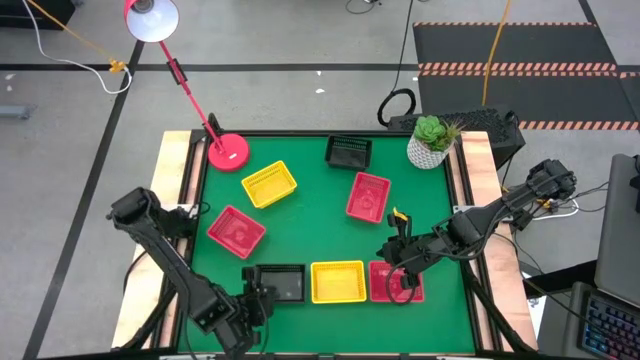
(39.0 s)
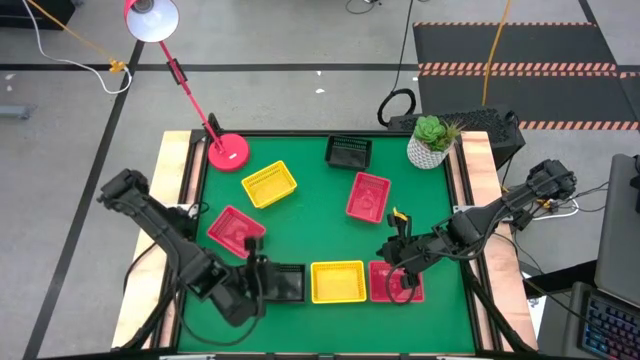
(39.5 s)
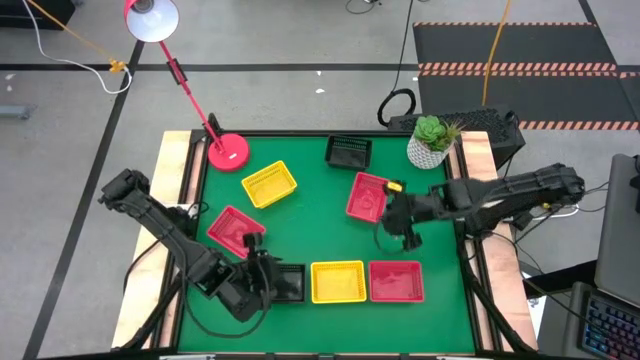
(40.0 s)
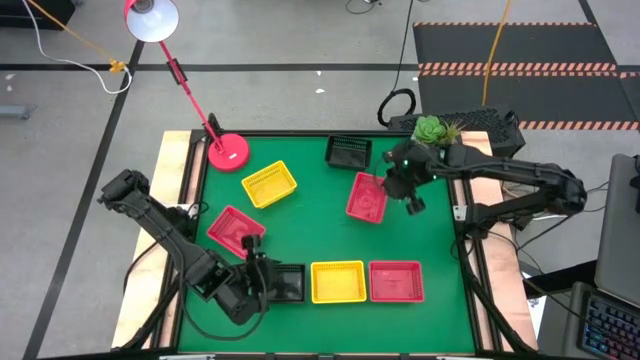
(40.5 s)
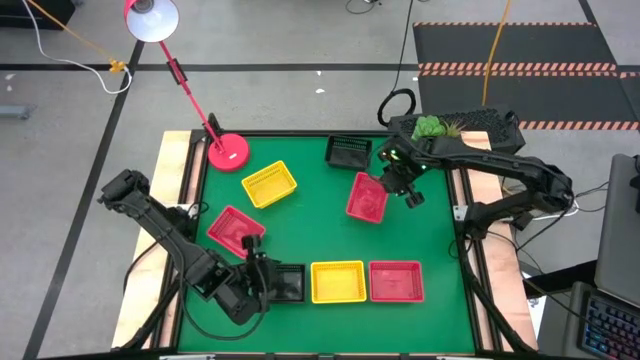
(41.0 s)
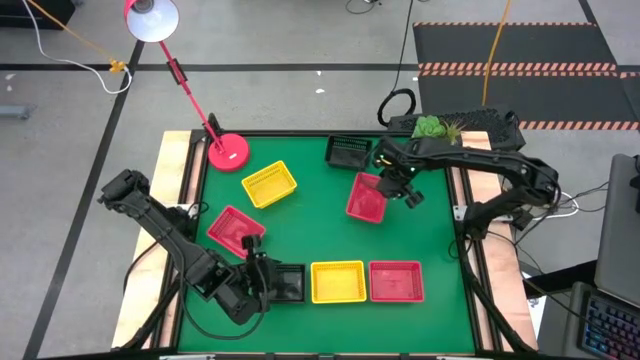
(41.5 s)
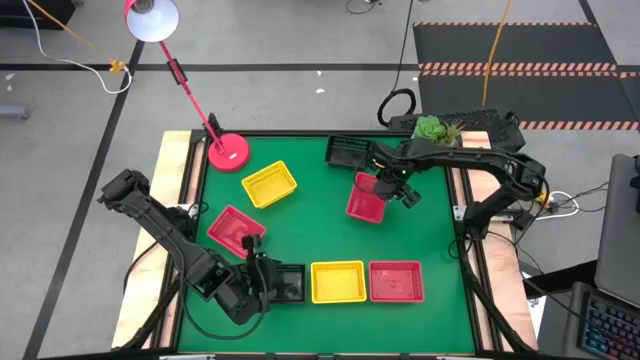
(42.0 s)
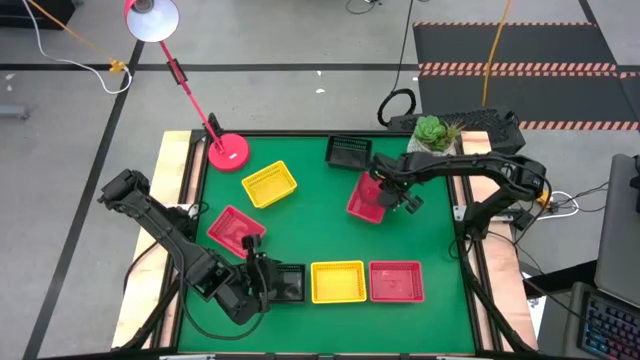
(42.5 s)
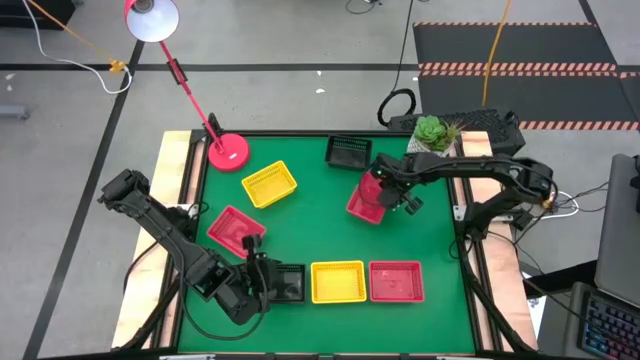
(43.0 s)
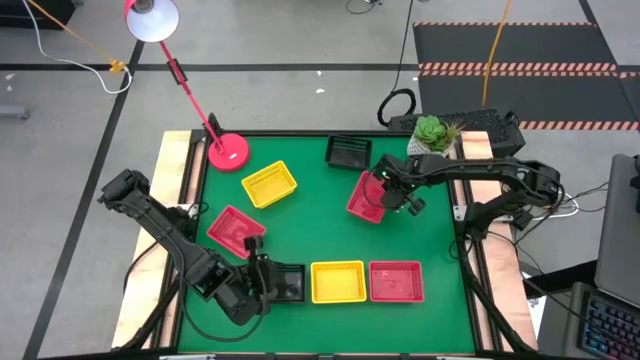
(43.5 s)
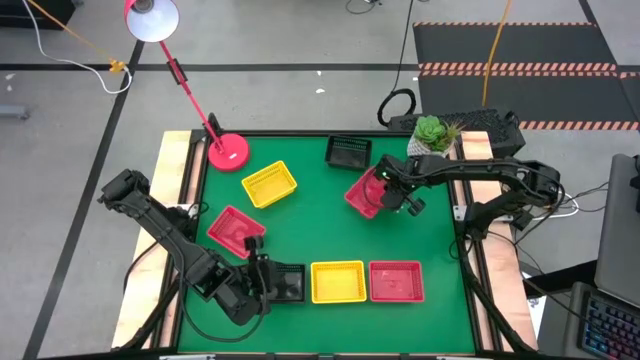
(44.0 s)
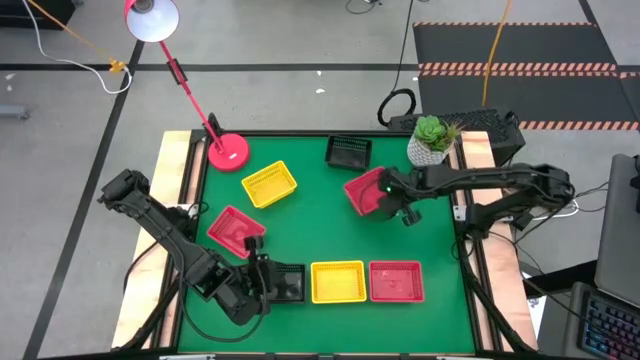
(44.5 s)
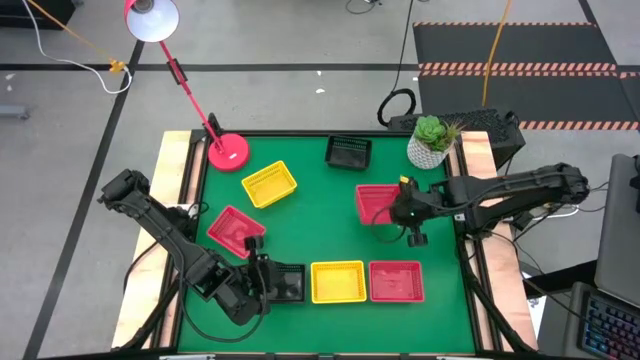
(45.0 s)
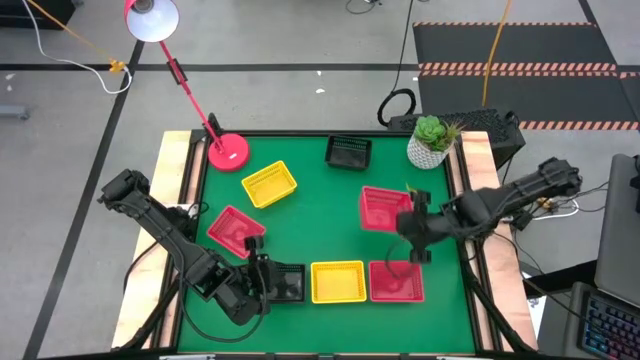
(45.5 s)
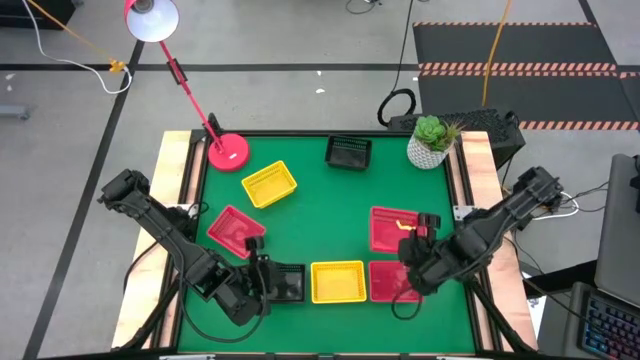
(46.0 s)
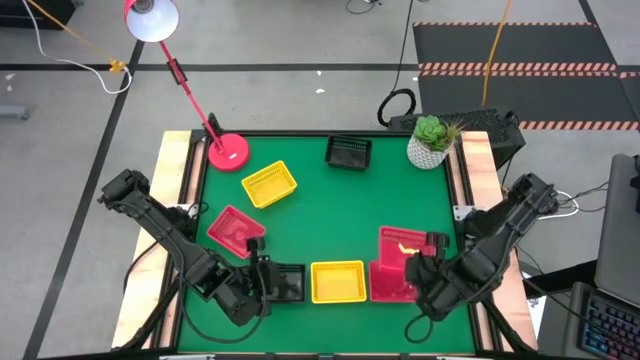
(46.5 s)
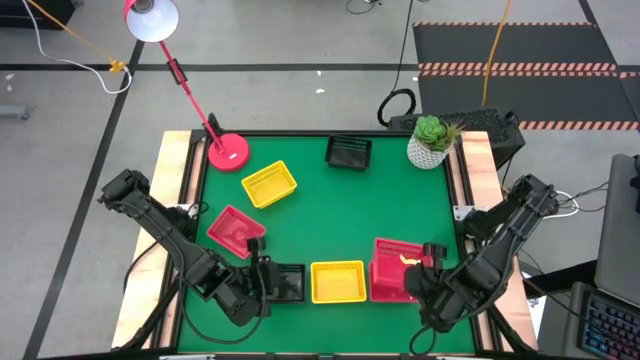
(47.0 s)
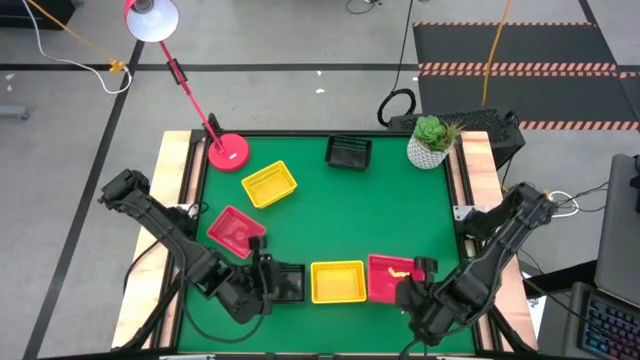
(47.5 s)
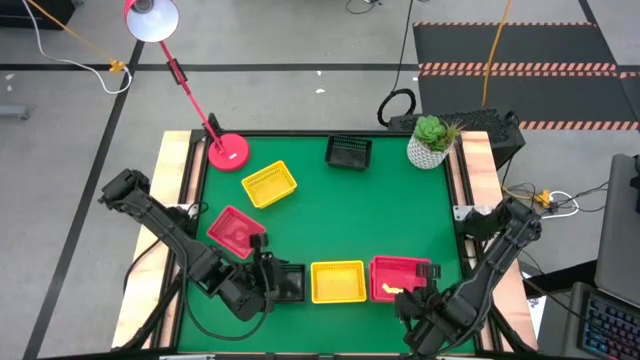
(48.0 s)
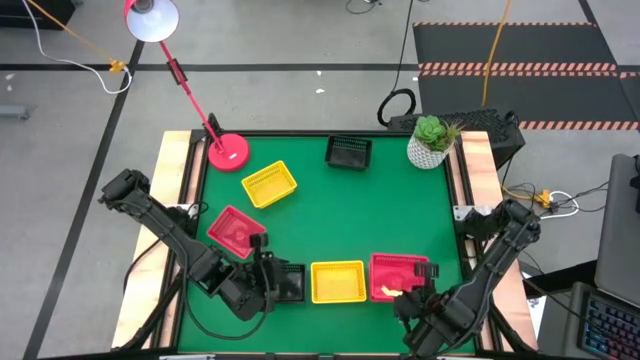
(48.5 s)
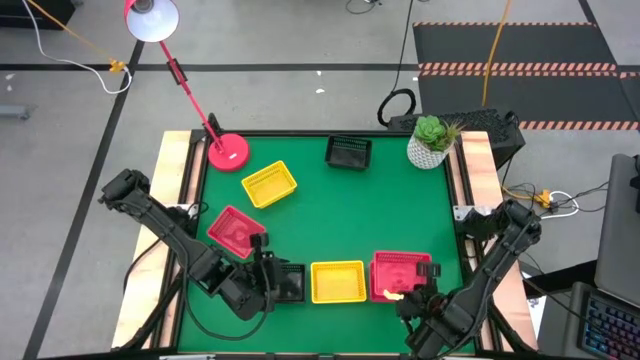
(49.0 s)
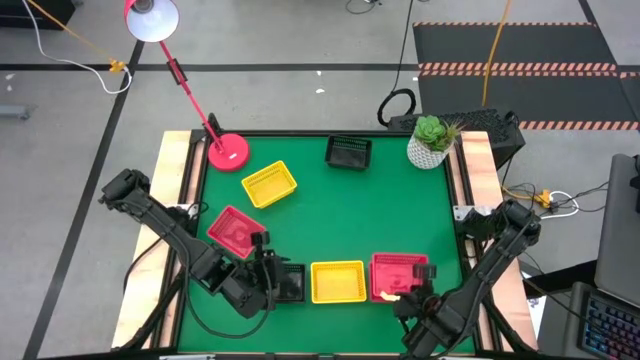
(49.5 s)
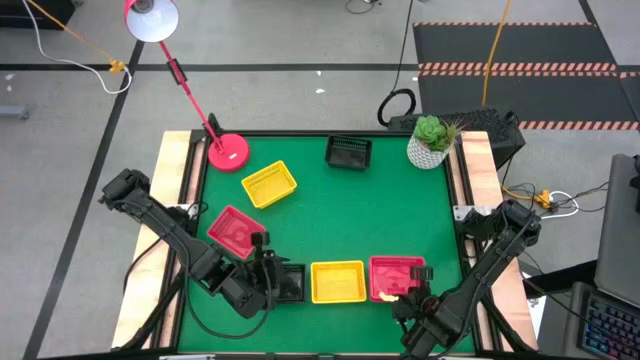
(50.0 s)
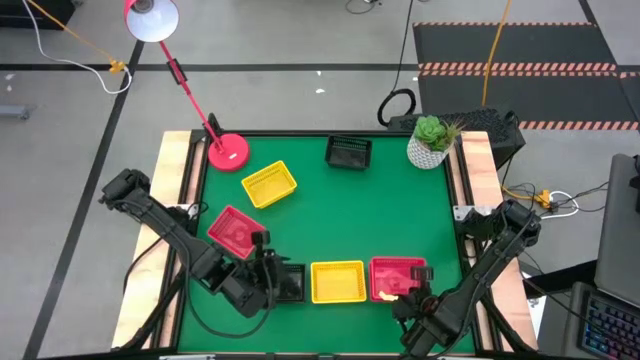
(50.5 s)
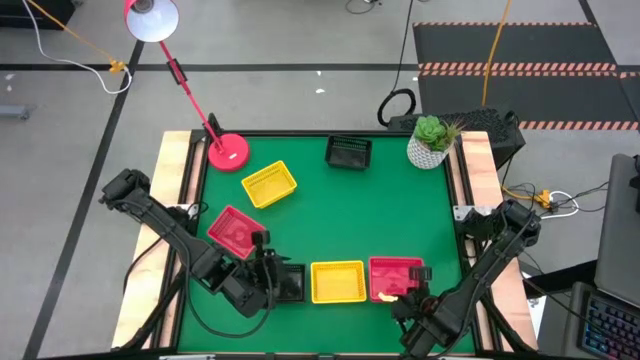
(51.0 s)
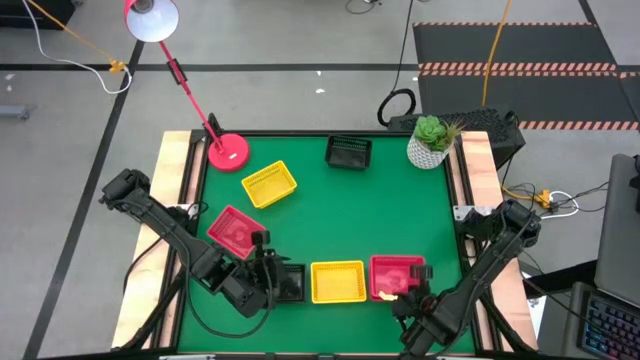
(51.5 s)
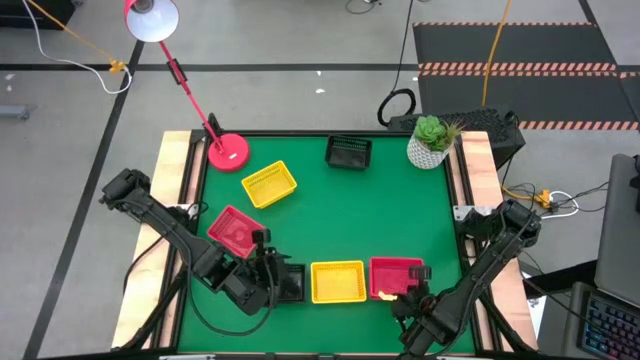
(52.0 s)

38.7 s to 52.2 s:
Stack the top right red bin on top of the bottom right red bin

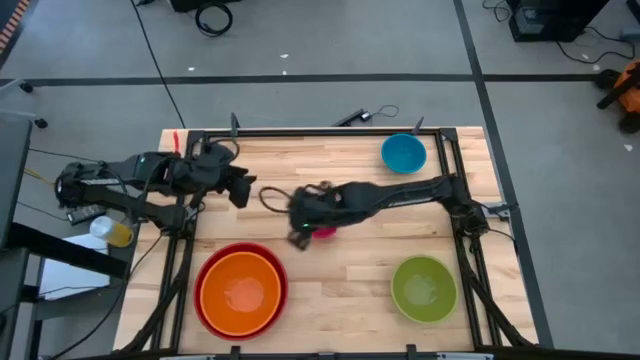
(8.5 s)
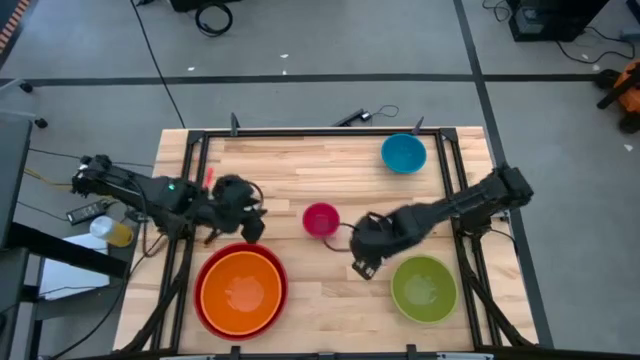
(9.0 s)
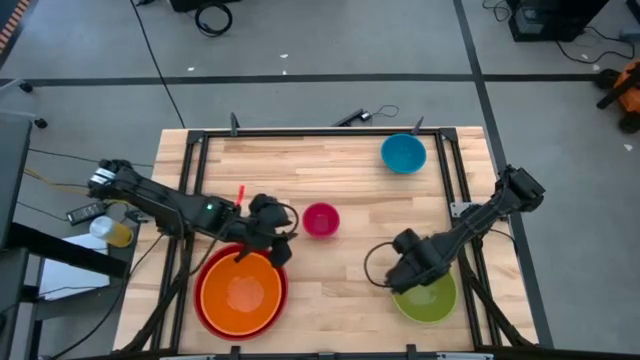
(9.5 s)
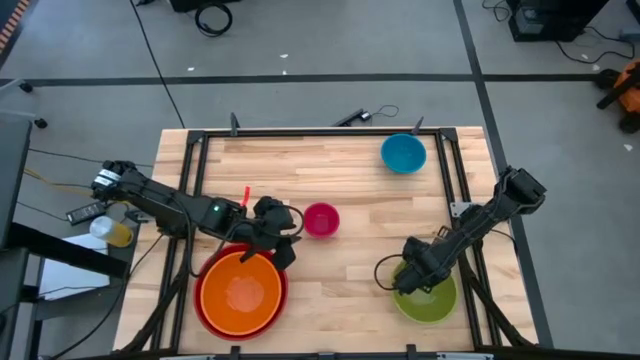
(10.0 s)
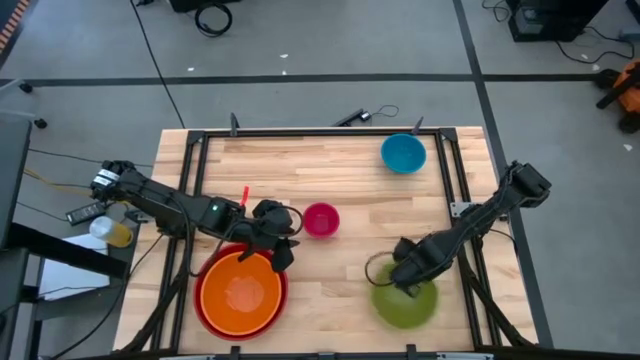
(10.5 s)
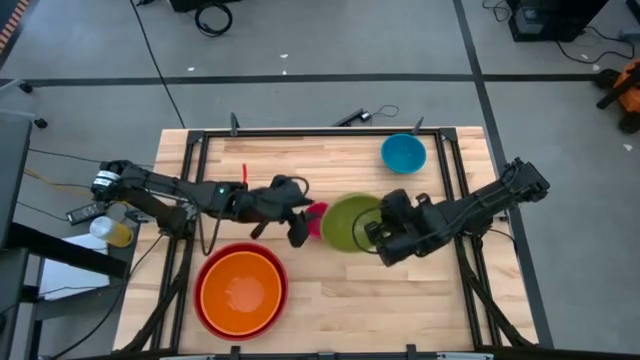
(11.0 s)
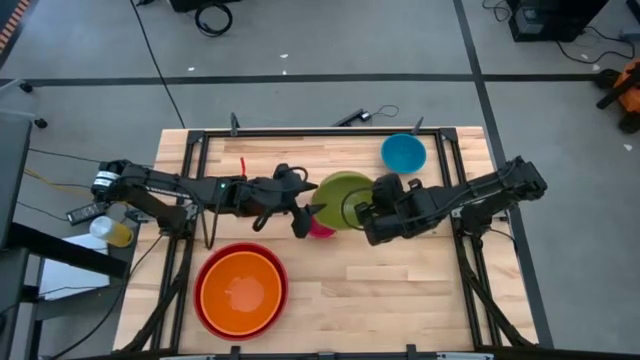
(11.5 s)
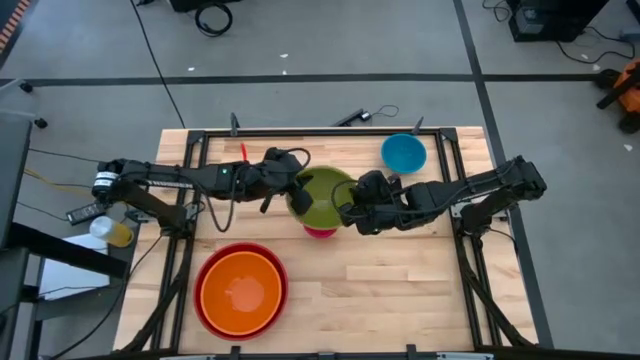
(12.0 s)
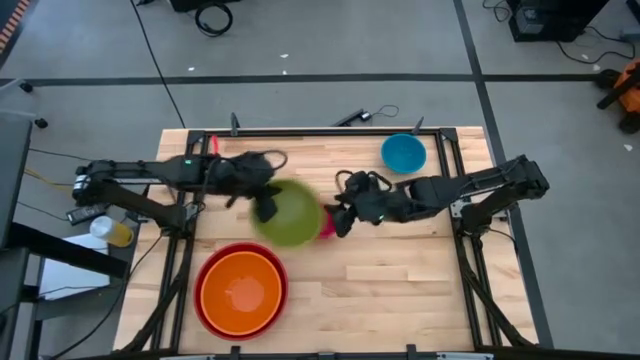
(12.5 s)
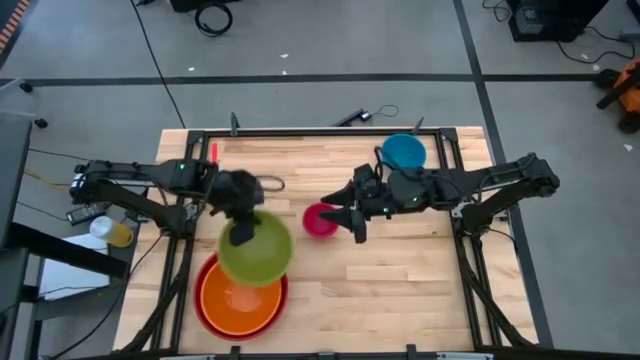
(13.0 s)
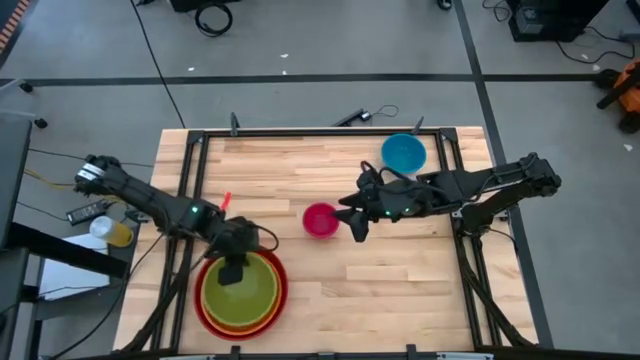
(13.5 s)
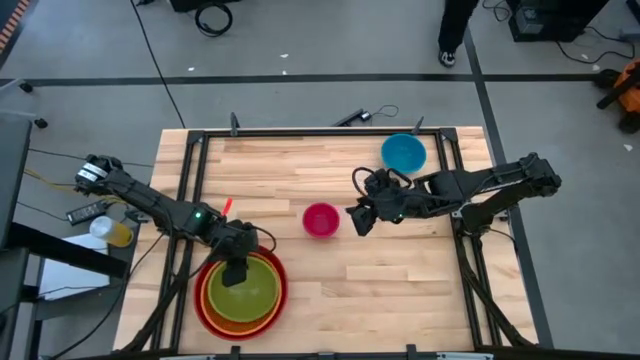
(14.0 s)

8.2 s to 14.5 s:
Stack the green bowl on the orange bowl

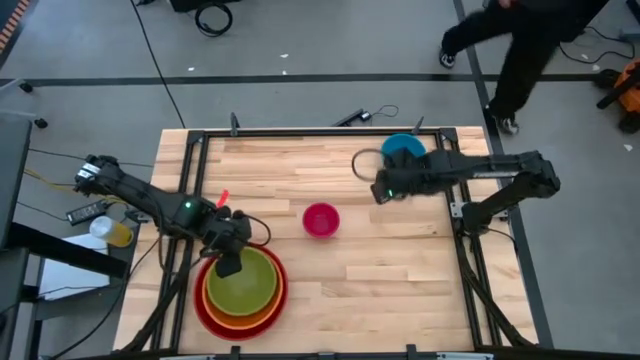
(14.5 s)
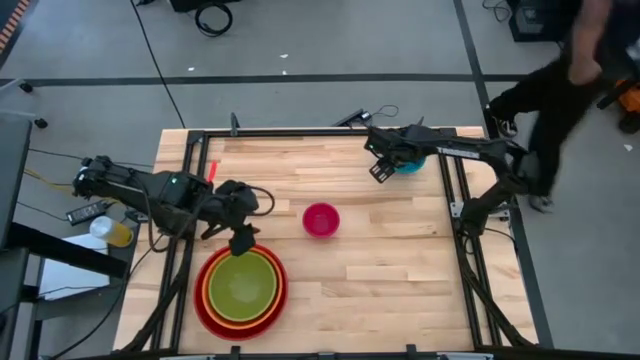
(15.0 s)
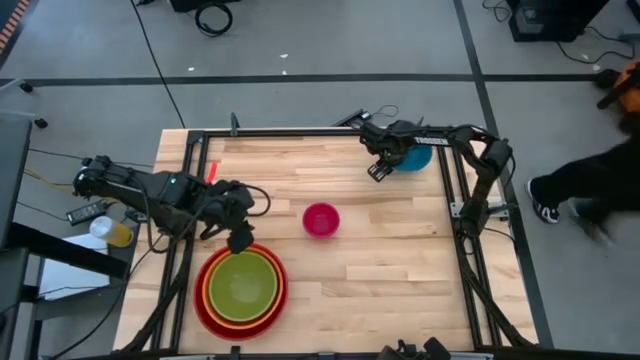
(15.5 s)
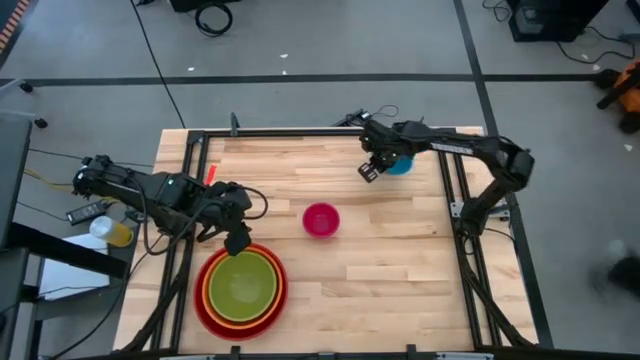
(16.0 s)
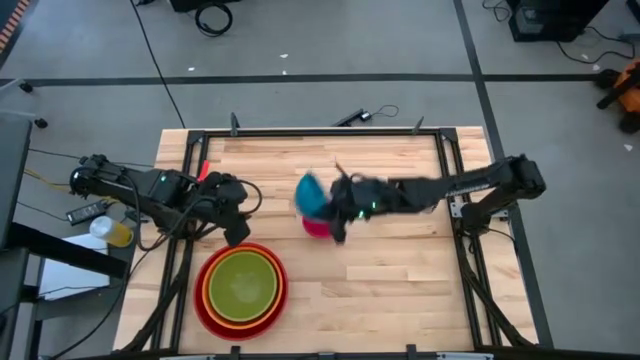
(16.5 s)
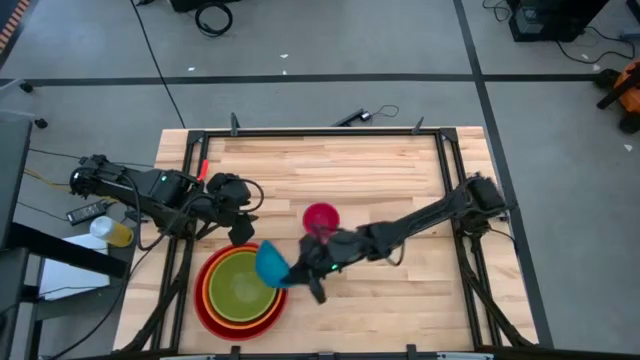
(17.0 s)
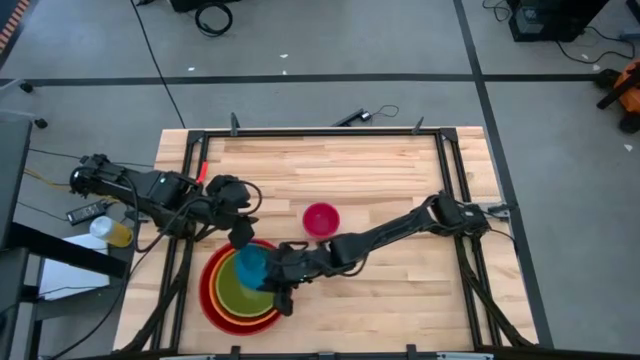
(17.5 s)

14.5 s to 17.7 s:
Stack the blue bowl on the green bowl
